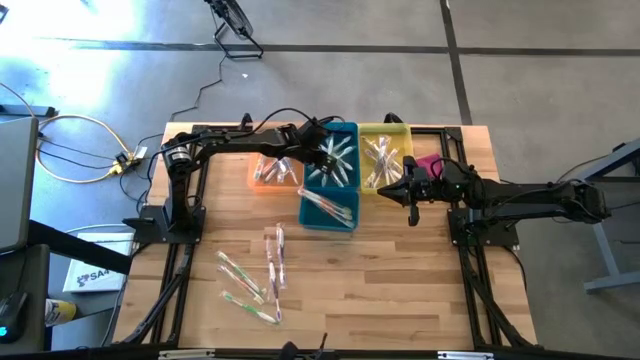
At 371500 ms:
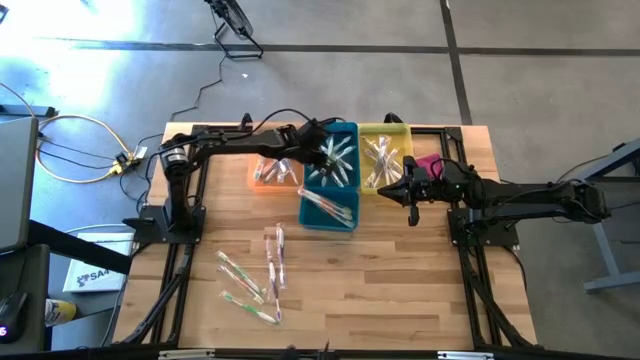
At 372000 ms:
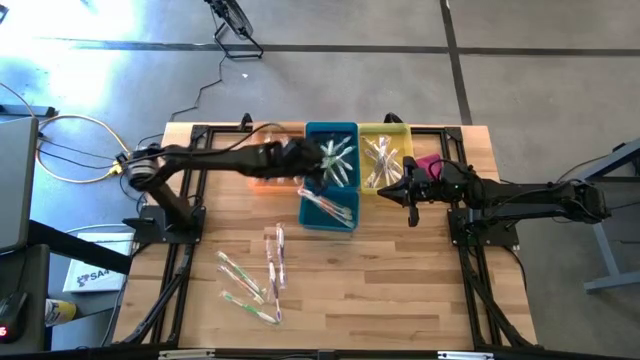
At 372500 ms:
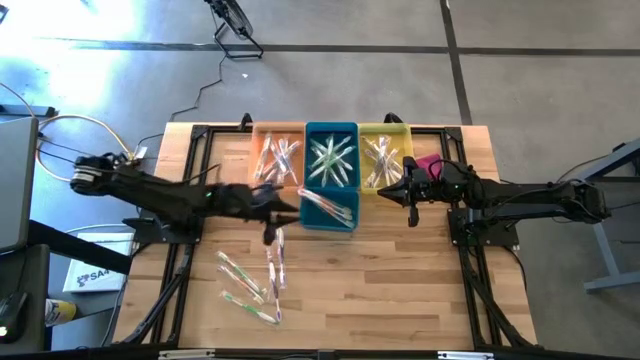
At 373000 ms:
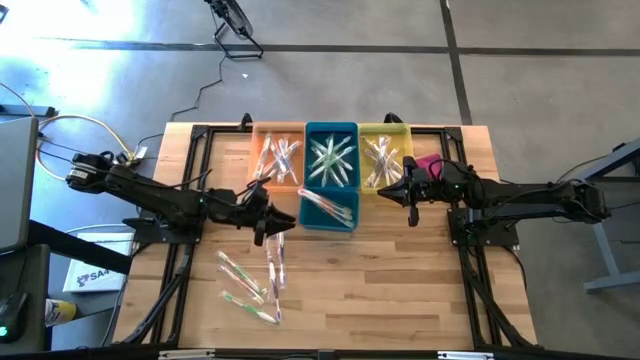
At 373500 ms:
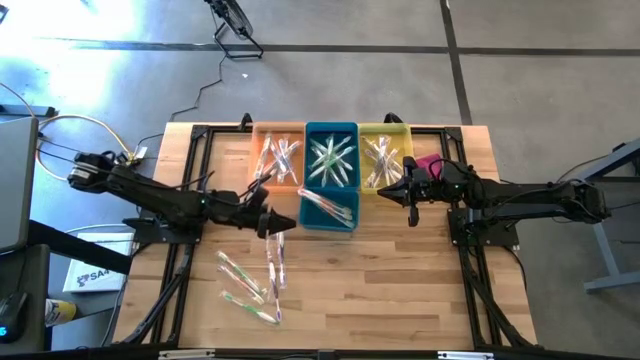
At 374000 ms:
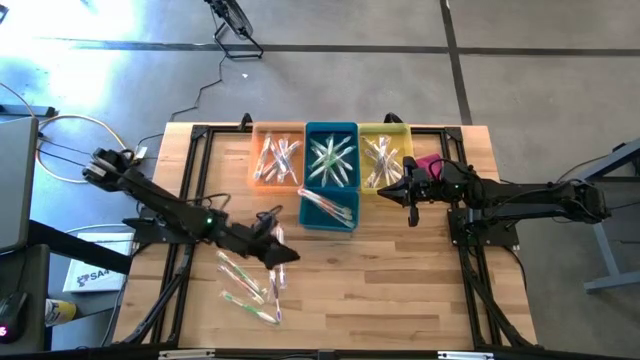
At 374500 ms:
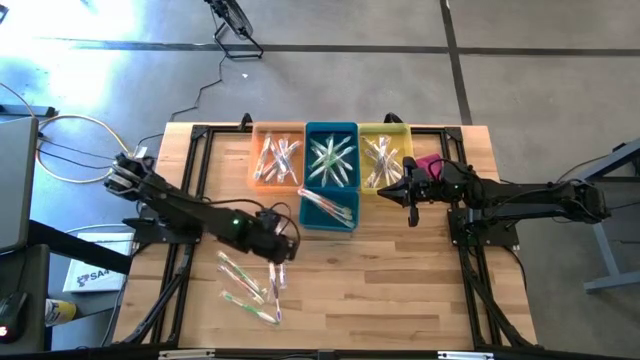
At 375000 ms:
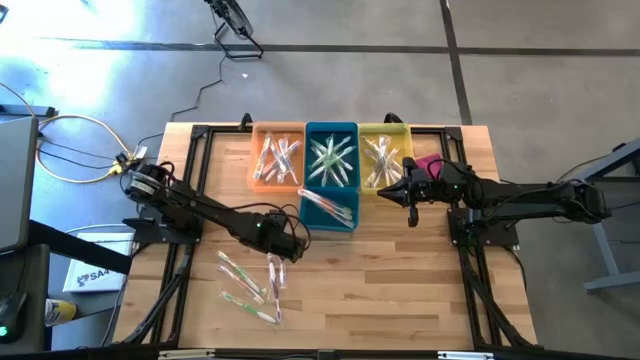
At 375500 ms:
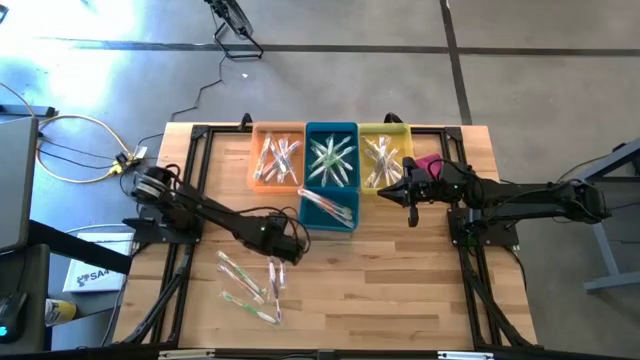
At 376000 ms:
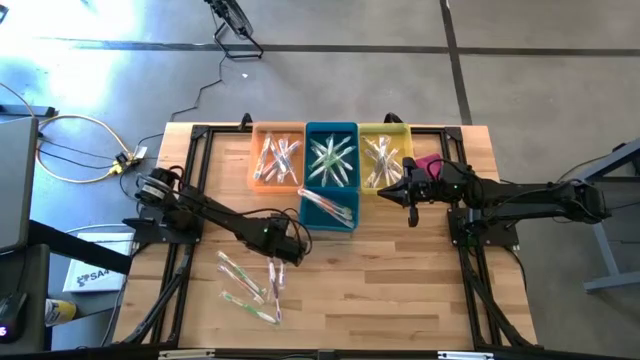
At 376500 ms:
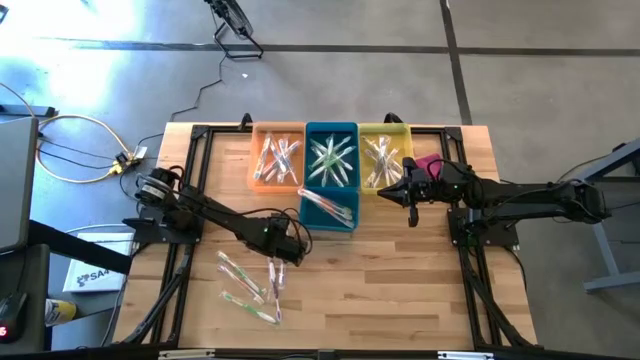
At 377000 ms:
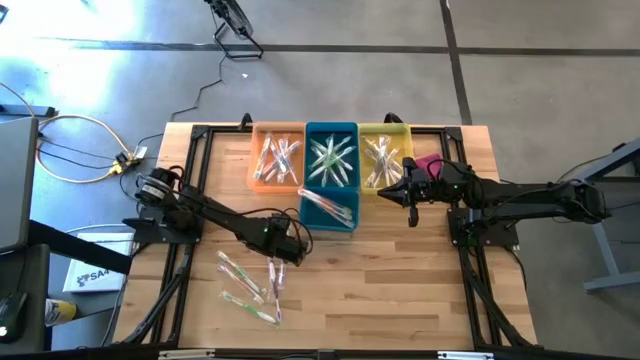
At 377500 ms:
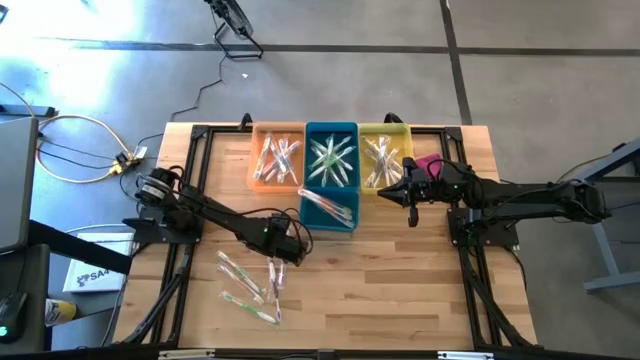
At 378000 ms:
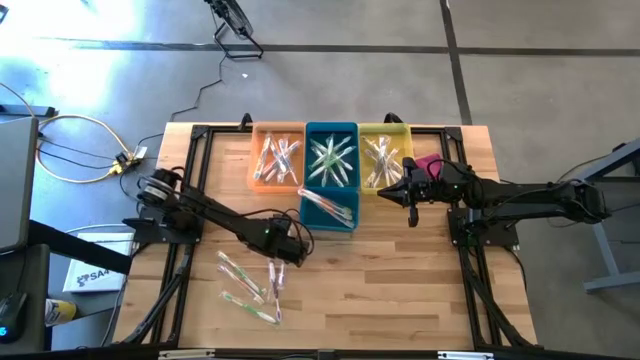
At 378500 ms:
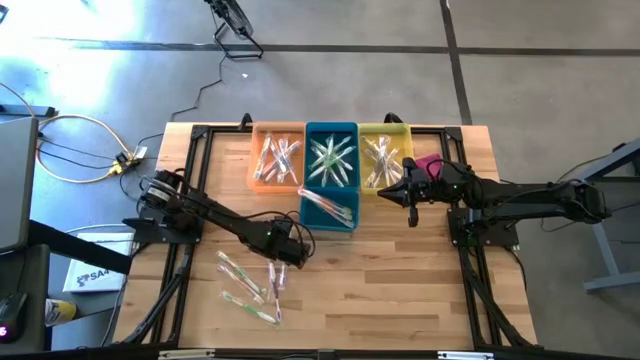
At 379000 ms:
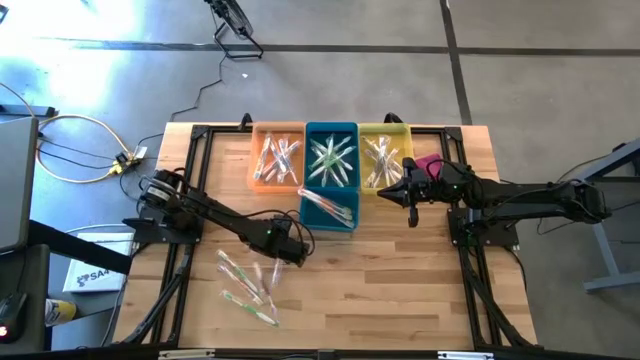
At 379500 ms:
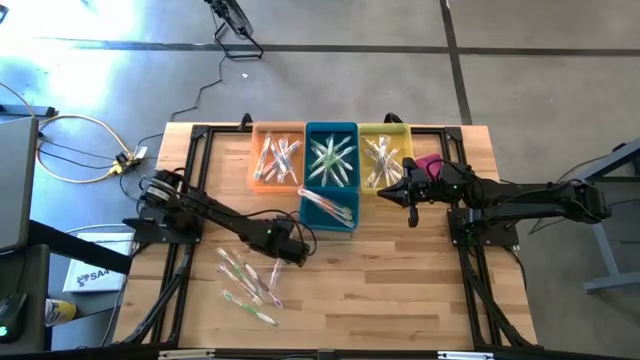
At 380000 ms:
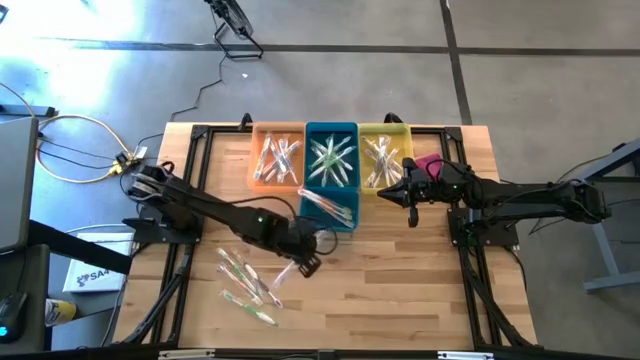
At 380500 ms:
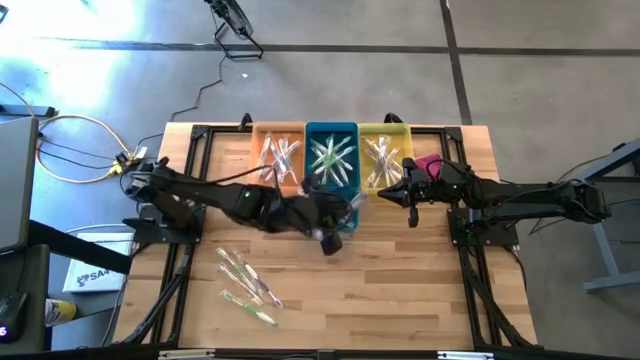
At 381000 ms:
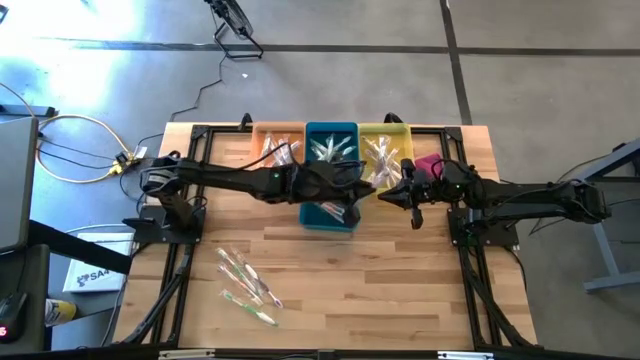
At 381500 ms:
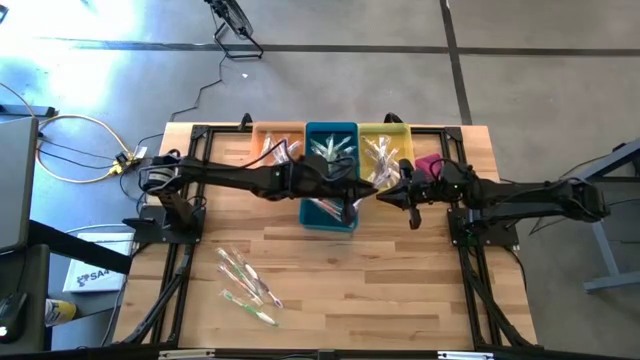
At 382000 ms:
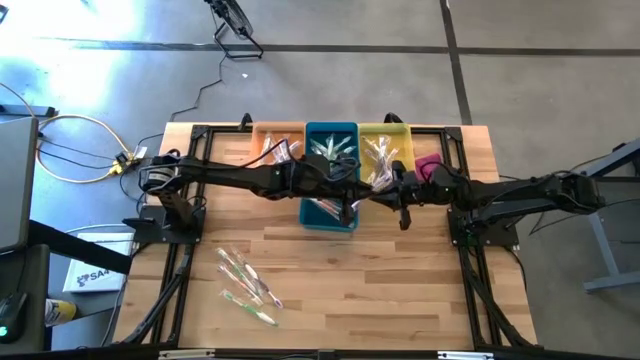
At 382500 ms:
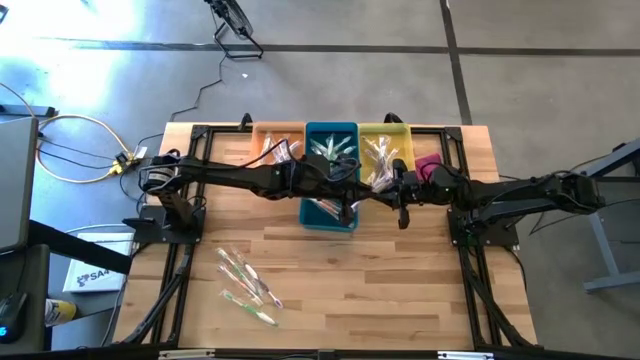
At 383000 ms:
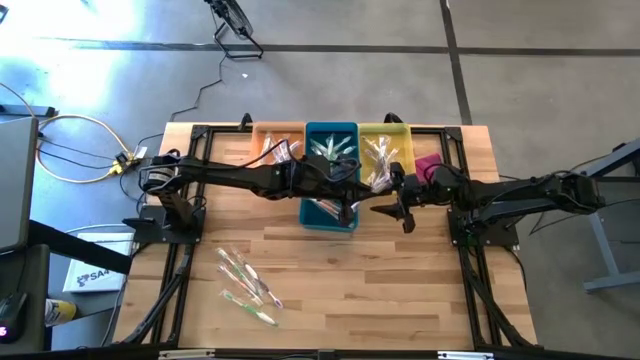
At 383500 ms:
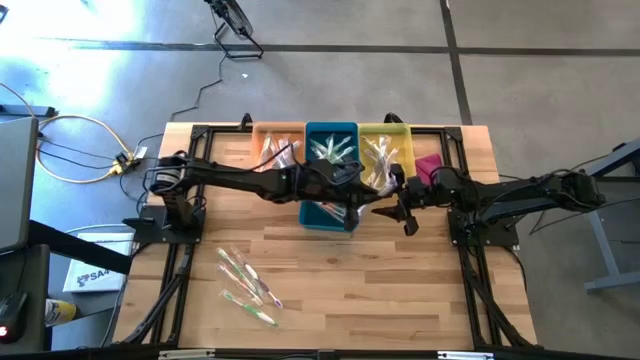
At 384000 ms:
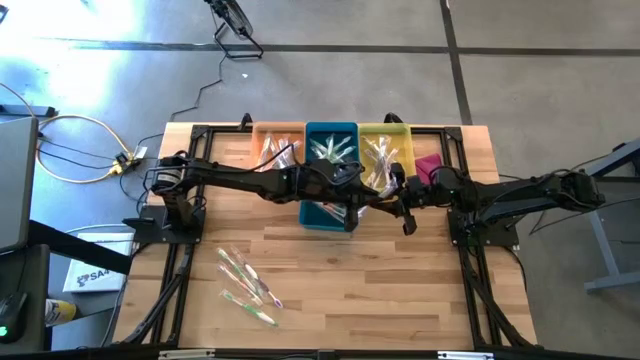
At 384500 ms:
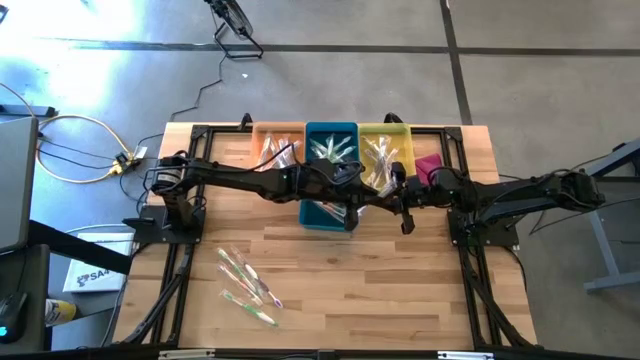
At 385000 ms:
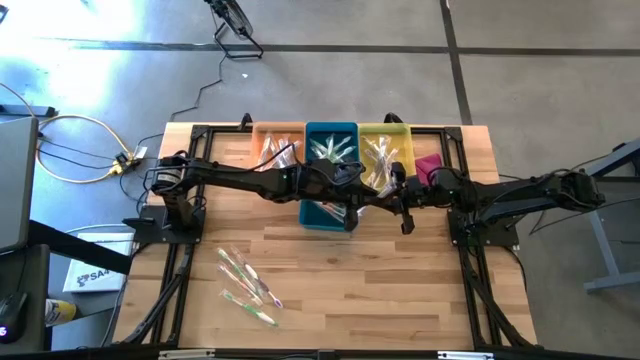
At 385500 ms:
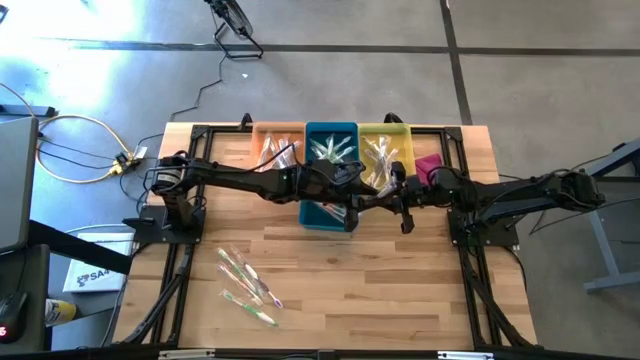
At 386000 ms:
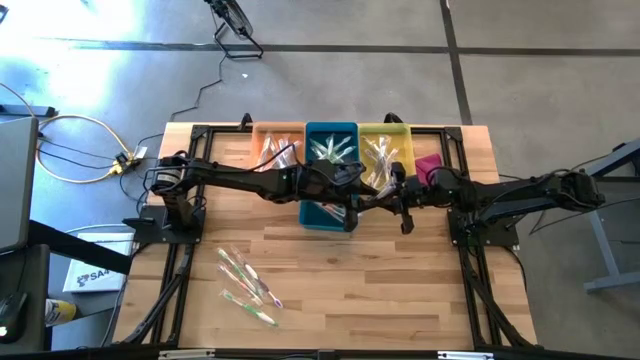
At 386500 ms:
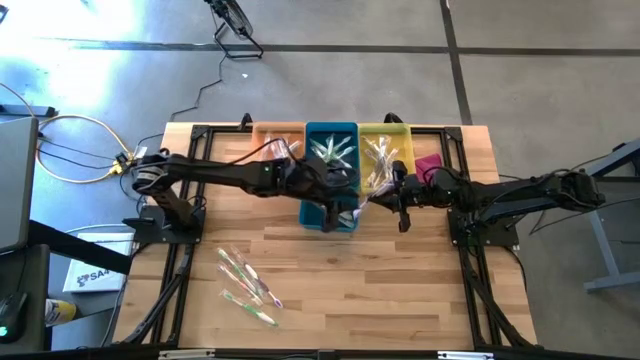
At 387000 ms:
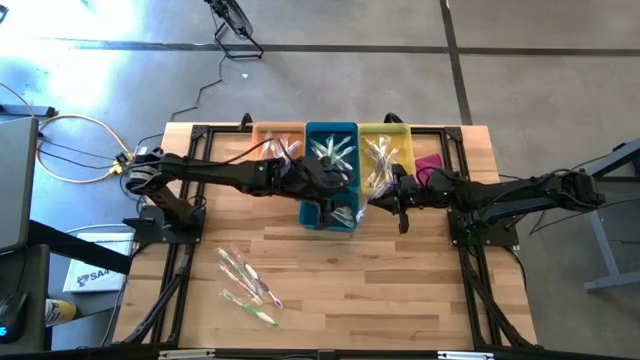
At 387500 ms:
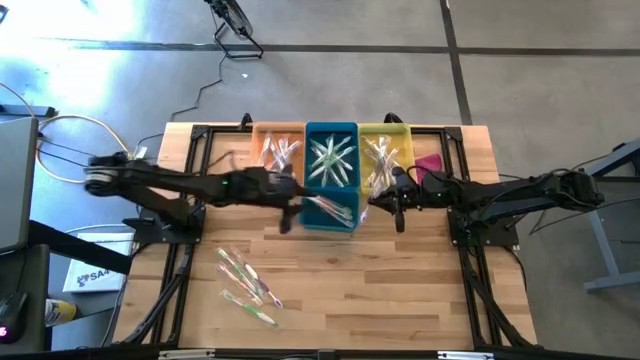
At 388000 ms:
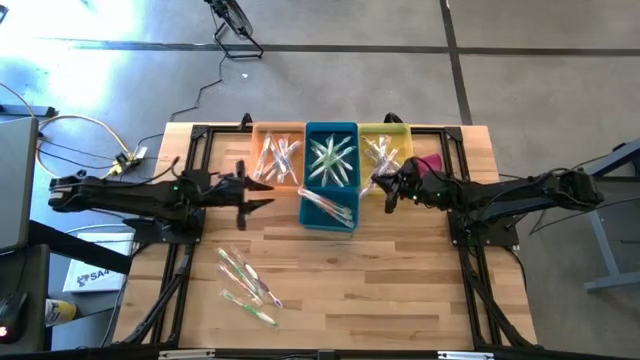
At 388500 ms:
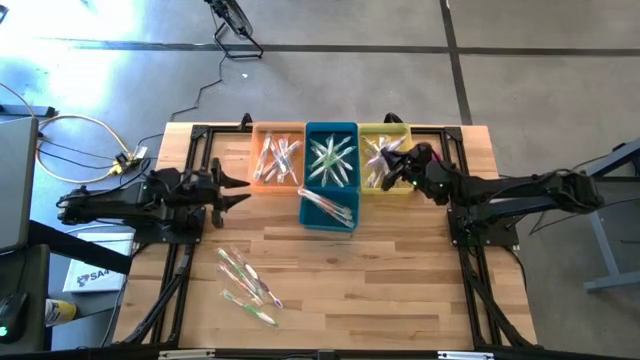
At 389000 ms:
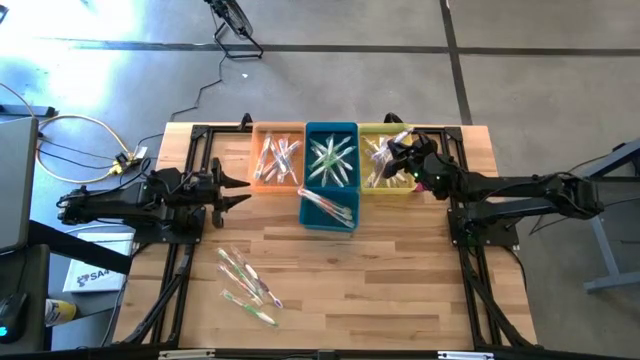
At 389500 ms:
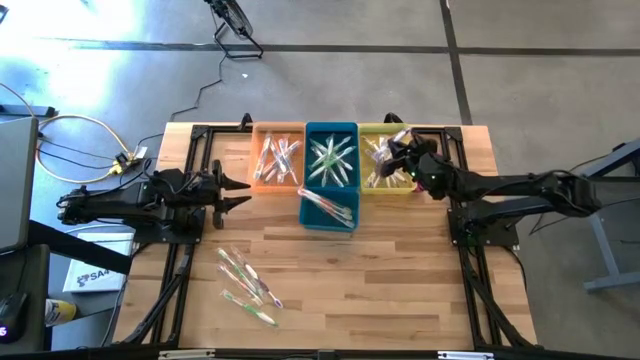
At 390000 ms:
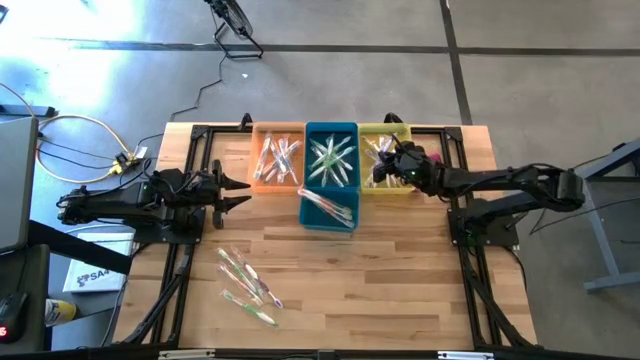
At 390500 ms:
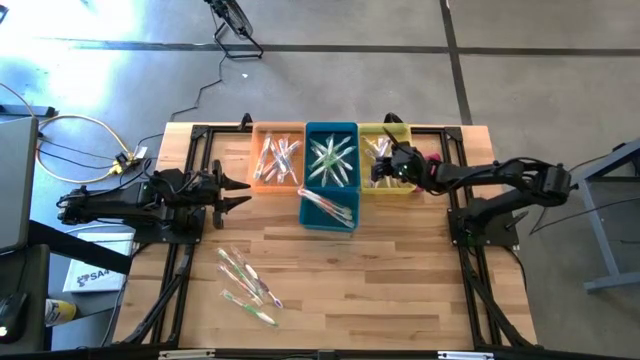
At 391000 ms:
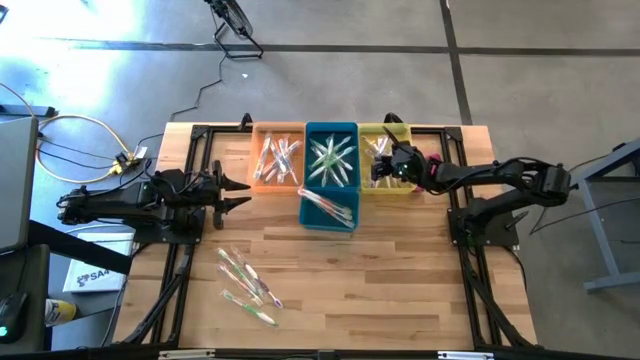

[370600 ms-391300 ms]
Task: Pick & Place Toothbrushes
Put the violet toothbrush into the yellow bin

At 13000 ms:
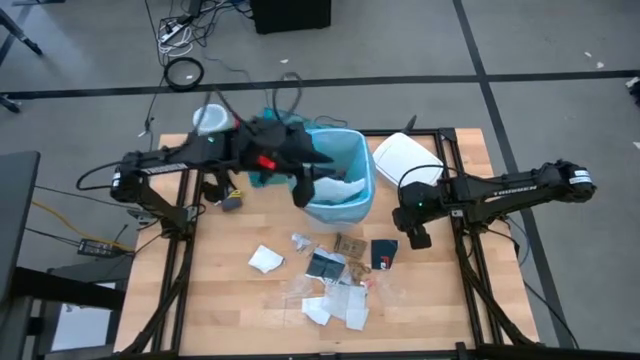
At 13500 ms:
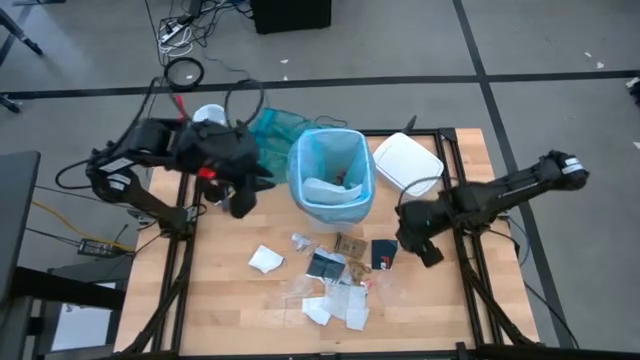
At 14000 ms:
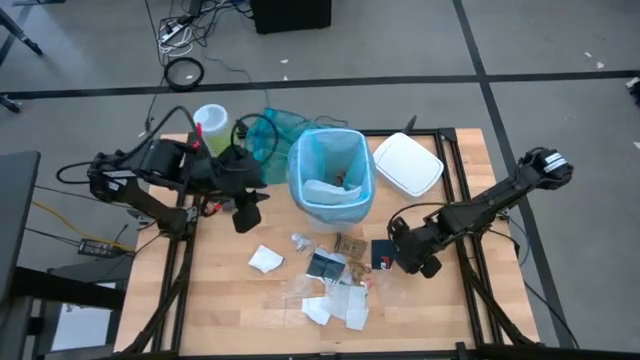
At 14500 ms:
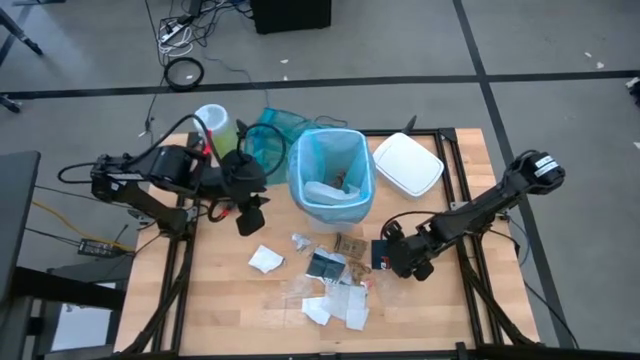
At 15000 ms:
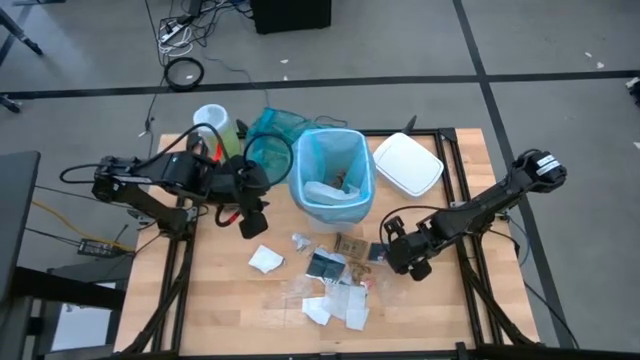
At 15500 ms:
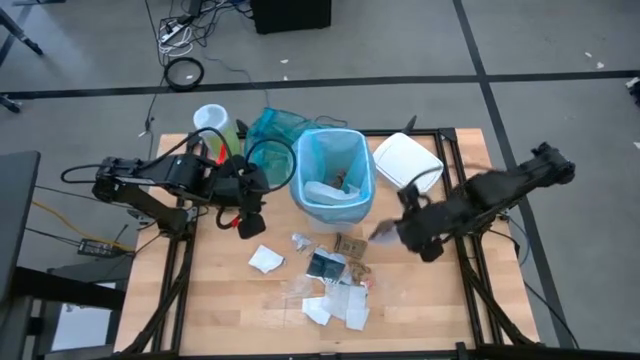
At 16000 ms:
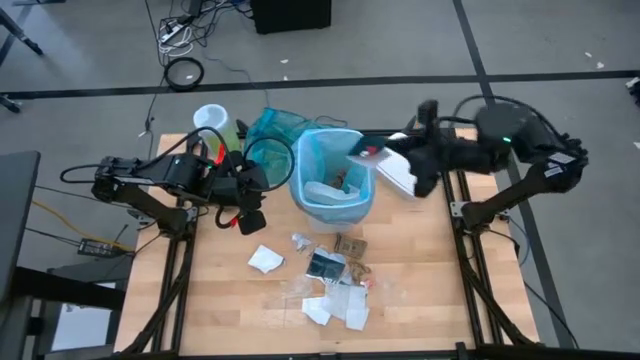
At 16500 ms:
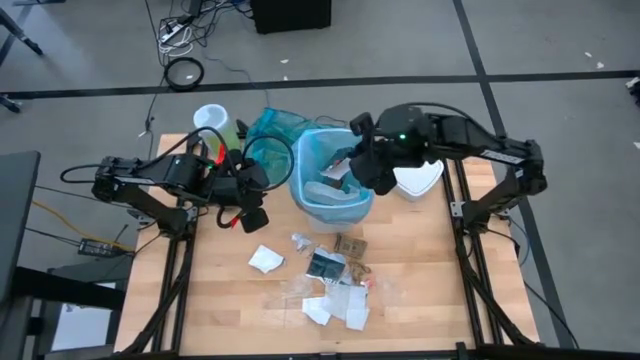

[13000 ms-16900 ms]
Task: place trash/remove bag and relplace
Put the black paper into the white trash bin
